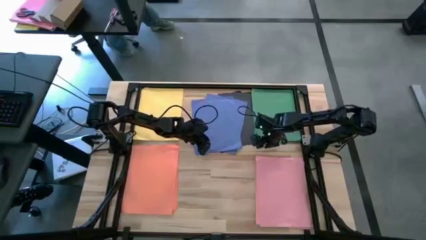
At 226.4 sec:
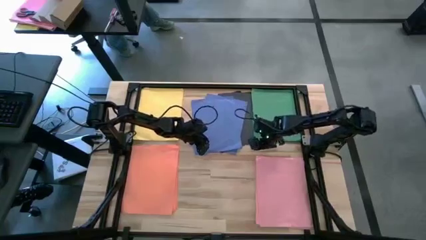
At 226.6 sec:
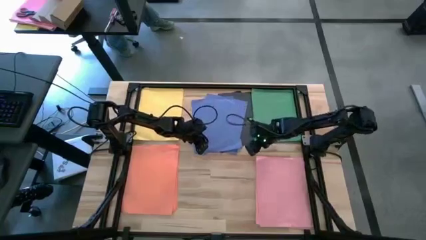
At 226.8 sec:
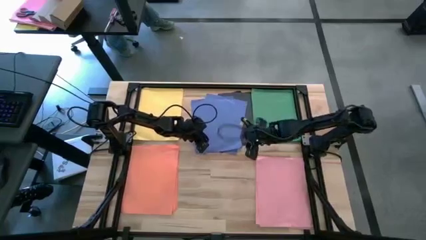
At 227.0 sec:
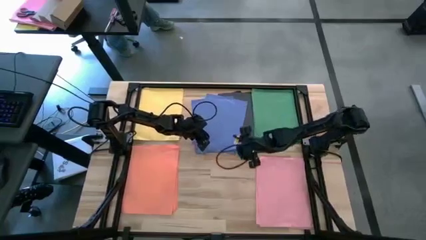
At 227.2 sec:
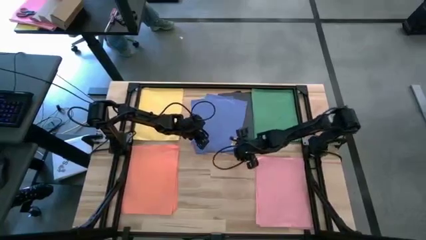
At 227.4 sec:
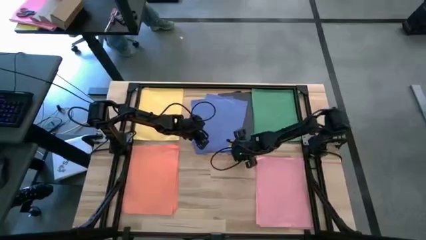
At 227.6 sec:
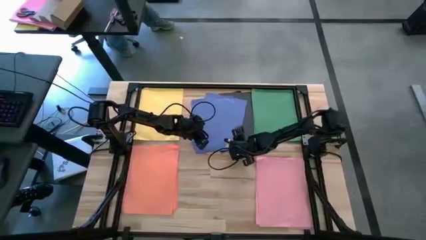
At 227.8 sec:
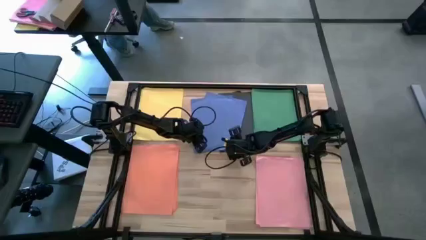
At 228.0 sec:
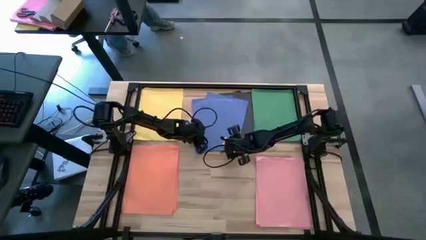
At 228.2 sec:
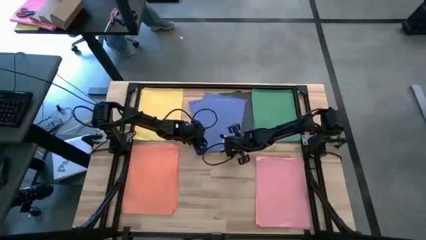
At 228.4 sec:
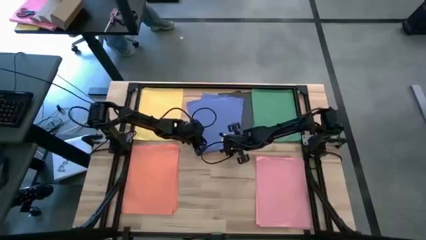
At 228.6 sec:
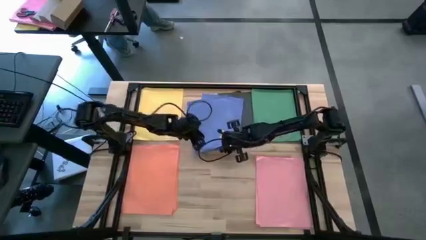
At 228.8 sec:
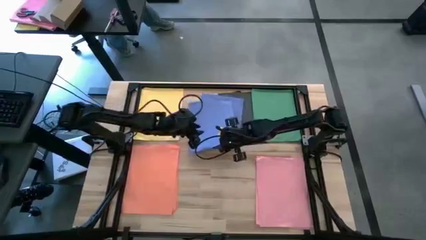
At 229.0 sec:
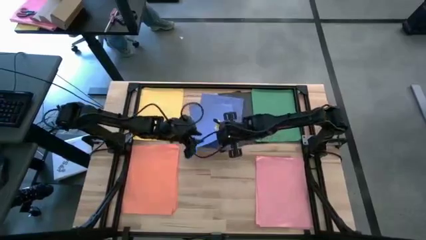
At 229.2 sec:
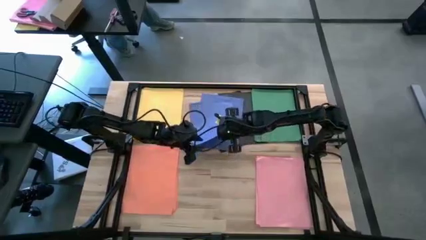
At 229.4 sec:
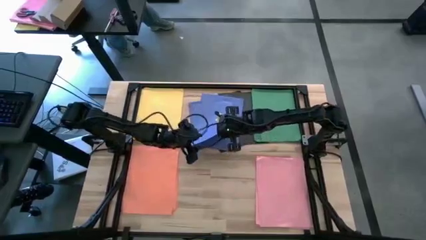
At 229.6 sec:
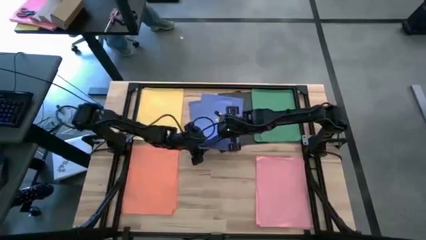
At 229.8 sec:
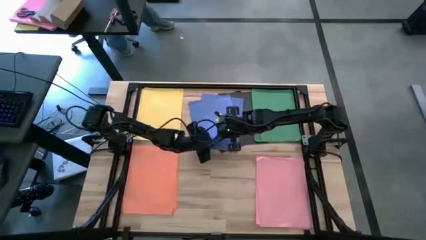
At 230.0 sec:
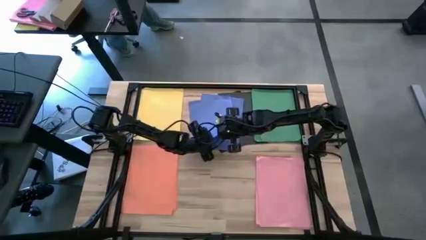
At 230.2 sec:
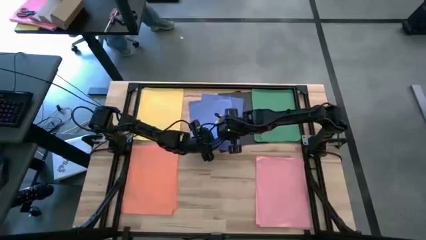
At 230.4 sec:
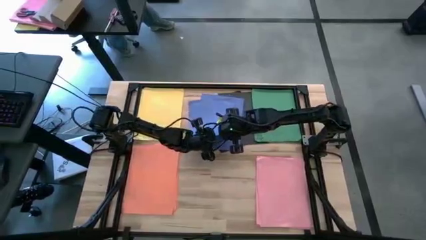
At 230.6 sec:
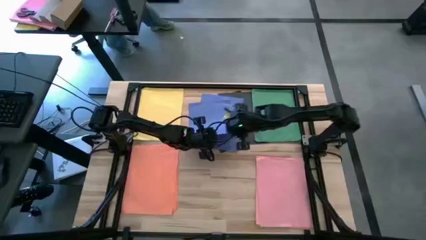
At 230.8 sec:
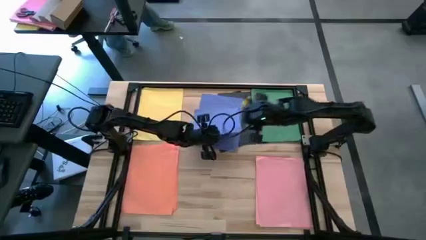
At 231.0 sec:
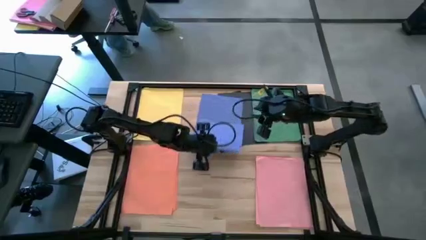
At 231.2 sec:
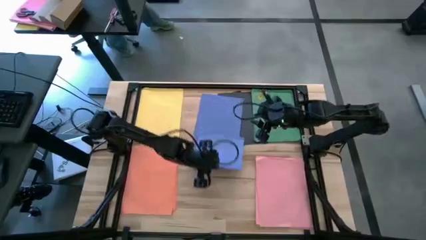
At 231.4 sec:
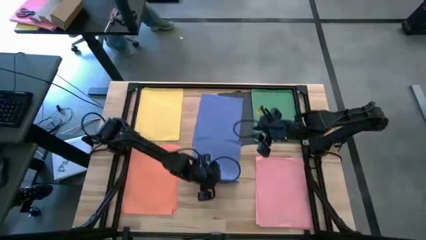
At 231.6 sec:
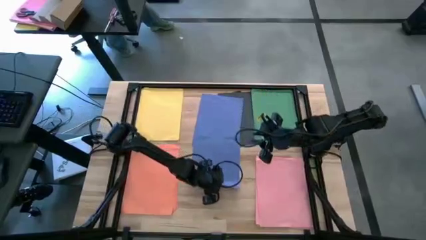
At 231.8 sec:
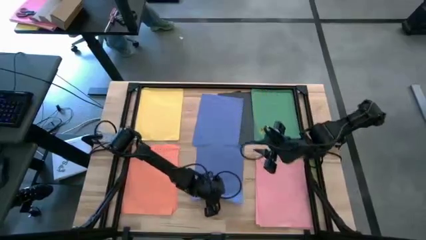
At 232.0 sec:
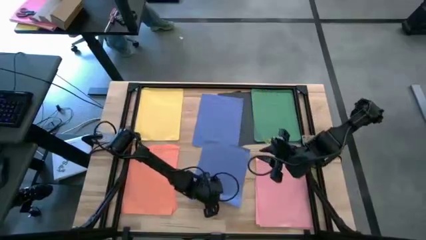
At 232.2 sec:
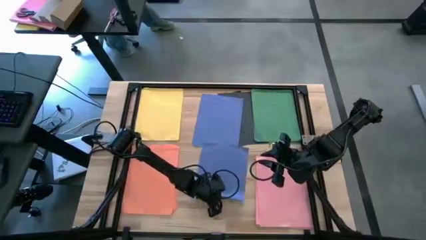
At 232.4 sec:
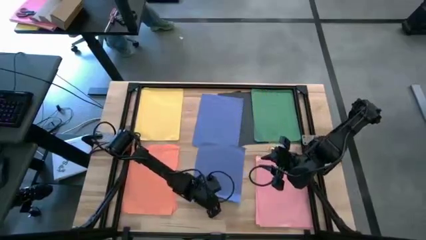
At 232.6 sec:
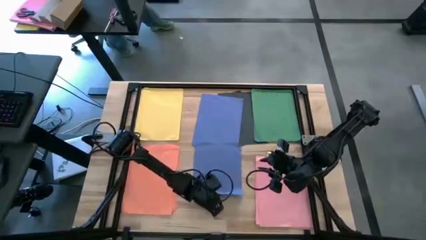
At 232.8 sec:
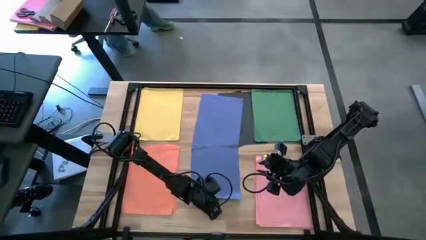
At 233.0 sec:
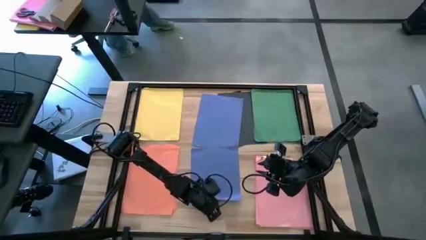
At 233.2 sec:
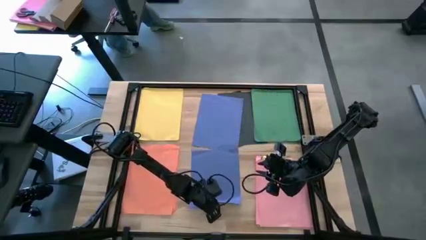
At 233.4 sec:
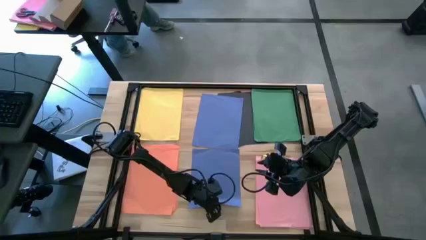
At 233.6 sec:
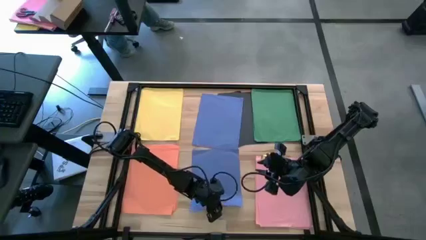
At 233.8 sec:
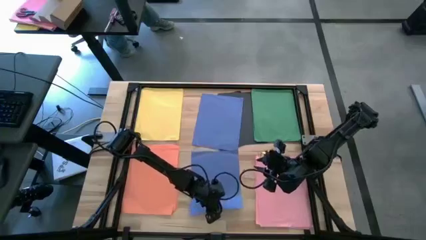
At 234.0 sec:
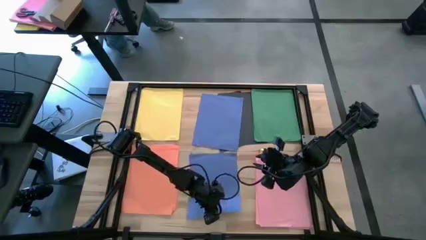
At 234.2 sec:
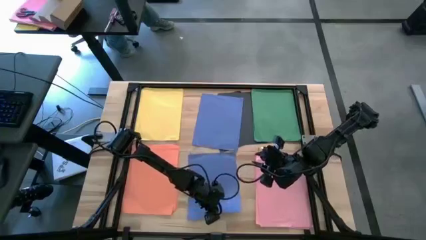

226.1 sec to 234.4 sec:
Task: Organize paper
Move the blue paper to the bottom center of the table

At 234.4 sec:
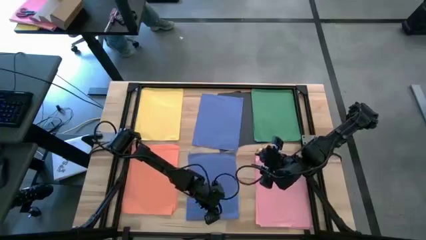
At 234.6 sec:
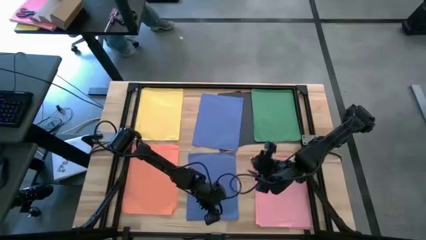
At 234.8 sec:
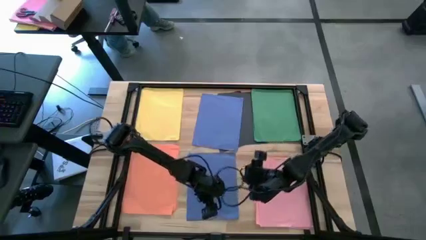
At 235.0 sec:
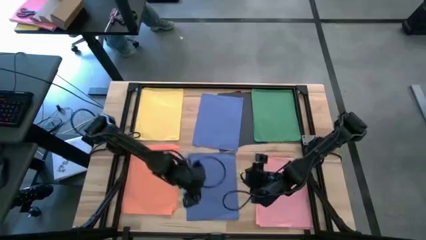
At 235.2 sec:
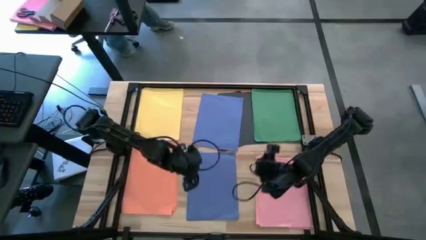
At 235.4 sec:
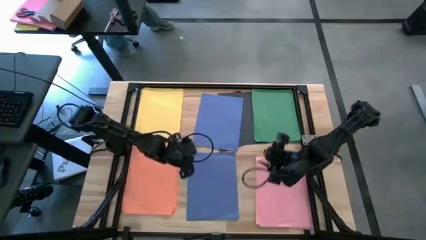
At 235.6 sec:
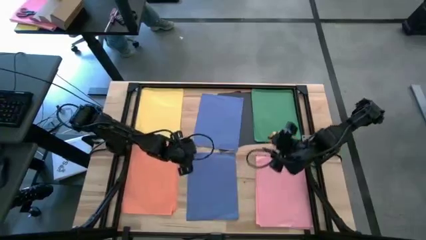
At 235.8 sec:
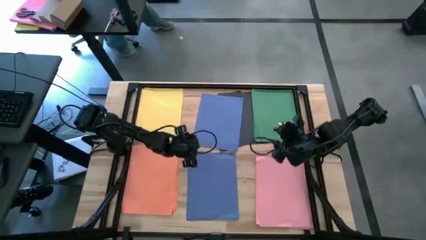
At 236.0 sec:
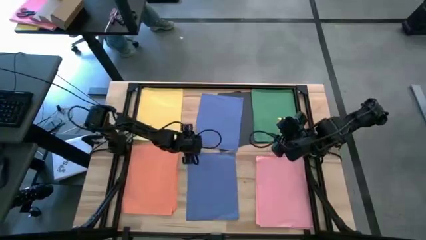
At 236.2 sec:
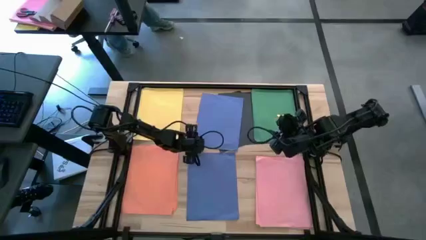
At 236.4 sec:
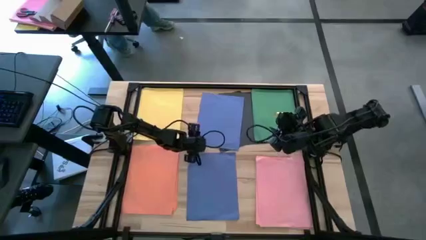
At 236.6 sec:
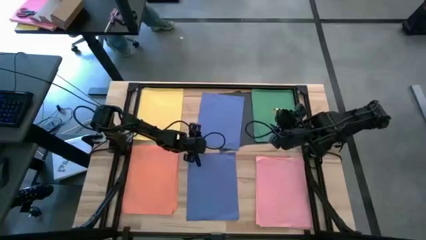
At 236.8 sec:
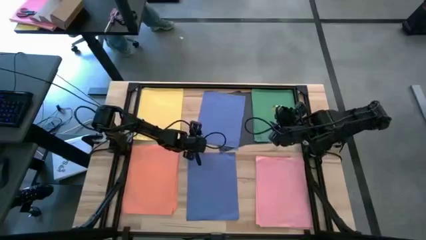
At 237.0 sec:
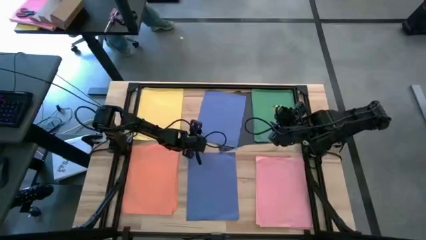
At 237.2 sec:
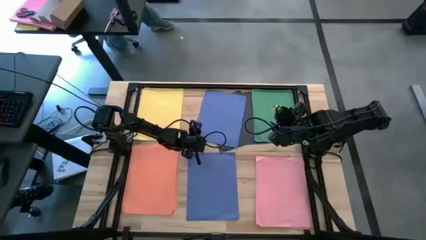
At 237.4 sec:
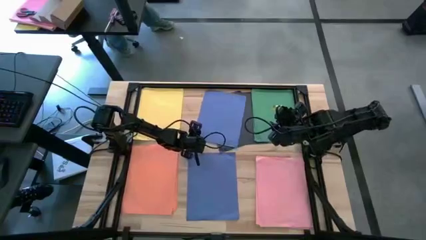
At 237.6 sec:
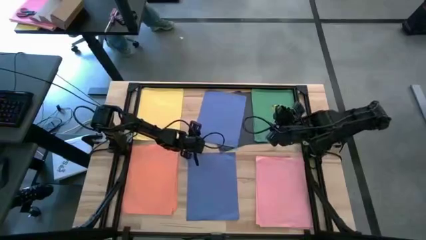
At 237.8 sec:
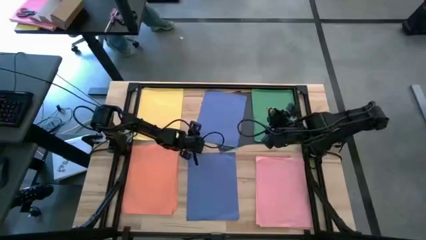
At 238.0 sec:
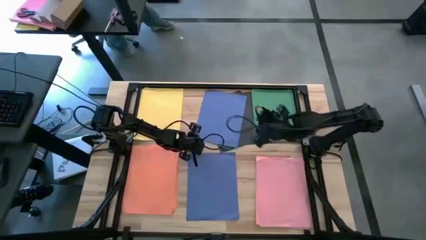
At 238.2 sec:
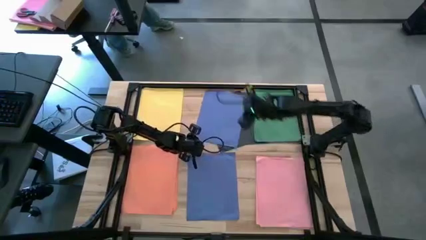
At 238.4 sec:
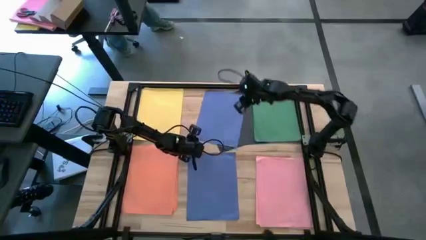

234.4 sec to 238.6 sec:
Stack the blue paper on top the other blue paper

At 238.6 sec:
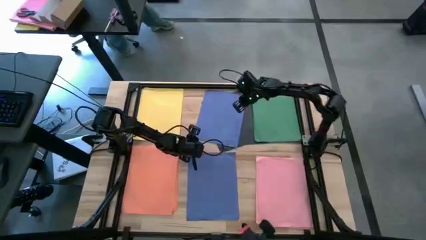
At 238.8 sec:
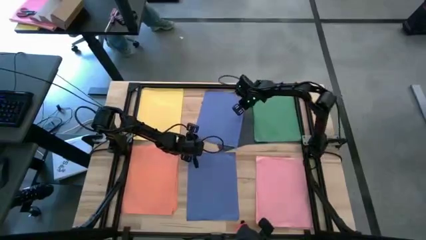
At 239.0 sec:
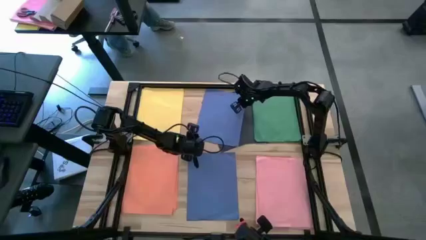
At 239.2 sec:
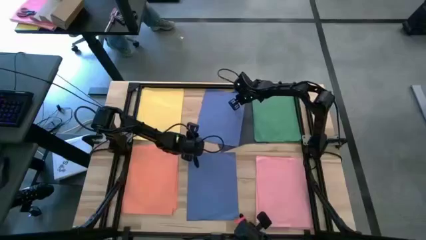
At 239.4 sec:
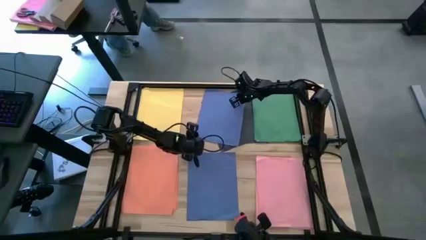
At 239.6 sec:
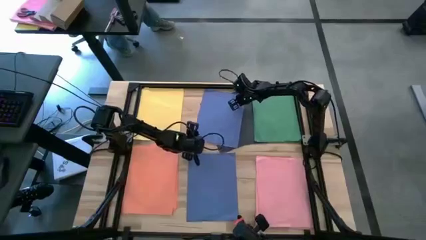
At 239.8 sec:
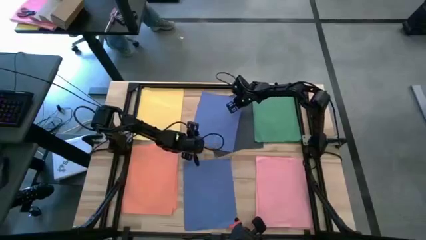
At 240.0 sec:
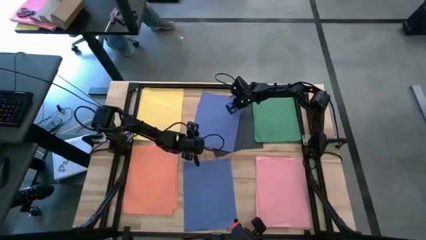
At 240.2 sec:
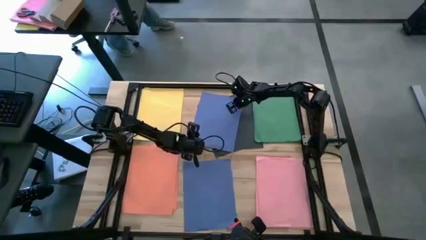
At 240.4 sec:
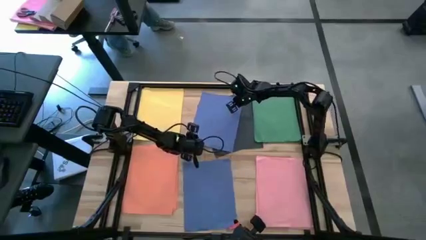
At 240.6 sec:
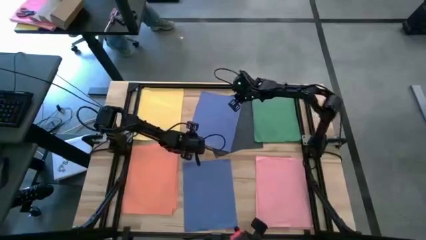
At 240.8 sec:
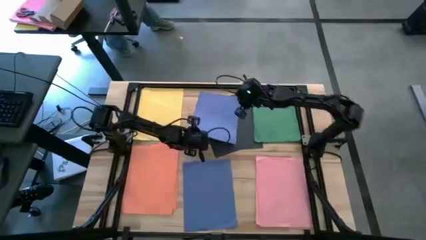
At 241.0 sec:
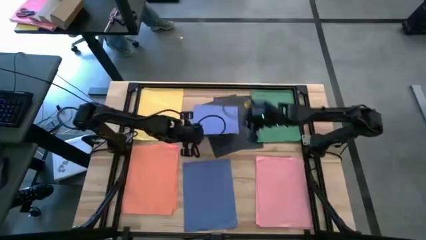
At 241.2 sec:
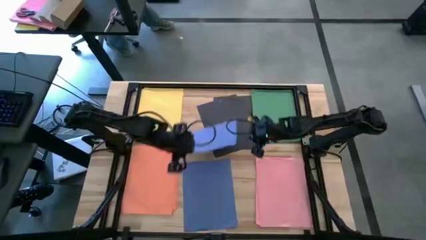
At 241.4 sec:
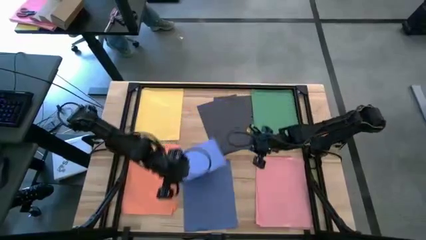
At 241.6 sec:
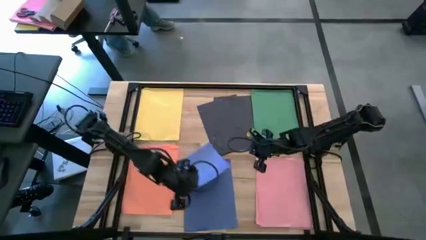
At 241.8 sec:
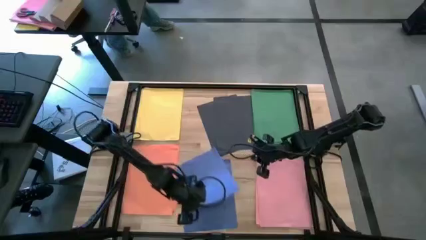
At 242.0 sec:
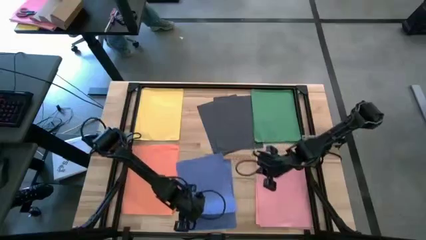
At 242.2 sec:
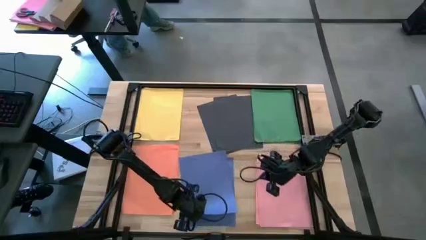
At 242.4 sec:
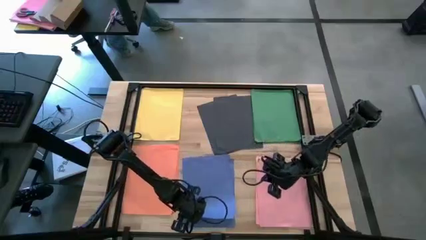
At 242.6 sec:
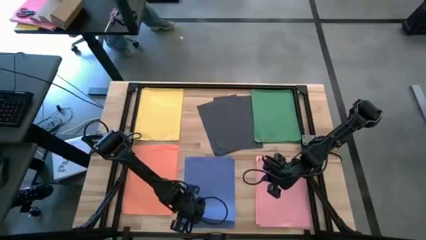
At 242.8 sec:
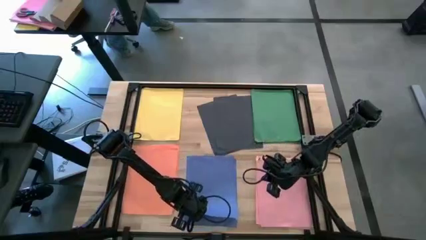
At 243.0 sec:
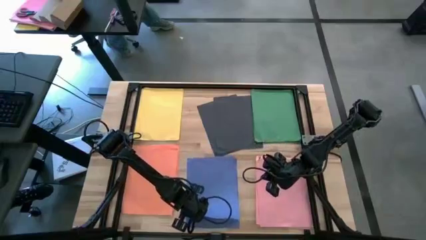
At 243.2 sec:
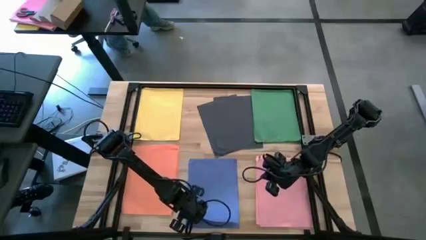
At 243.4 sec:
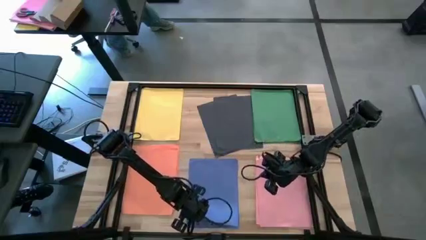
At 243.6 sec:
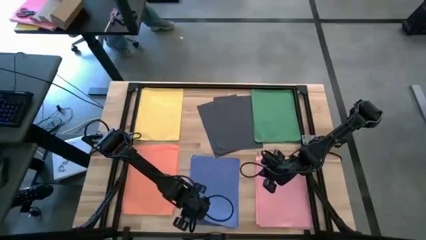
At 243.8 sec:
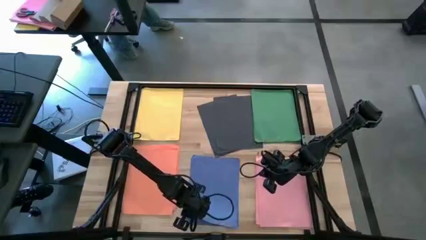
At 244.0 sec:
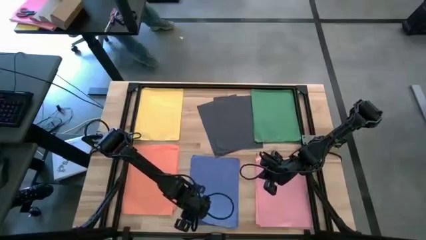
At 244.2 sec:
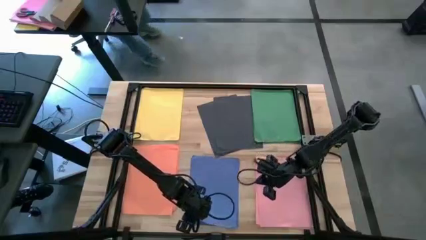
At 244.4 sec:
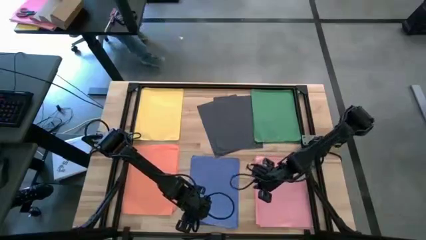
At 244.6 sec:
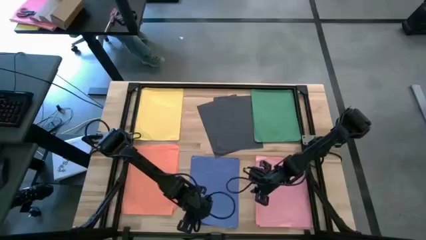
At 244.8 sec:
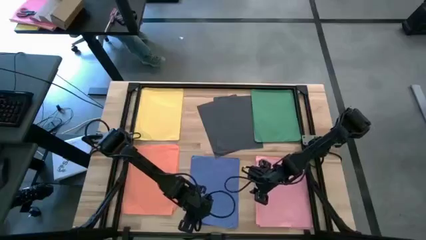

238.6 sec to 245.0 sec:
Stack the blue paper on top of the other blue paper
